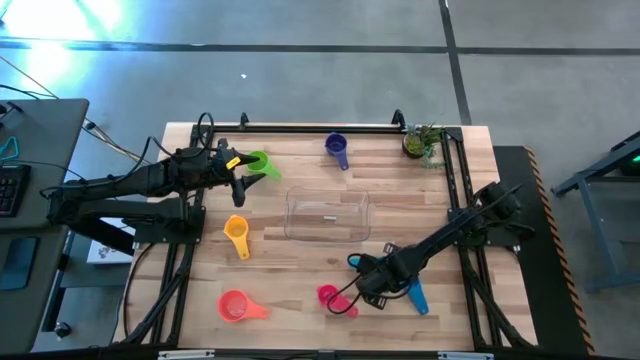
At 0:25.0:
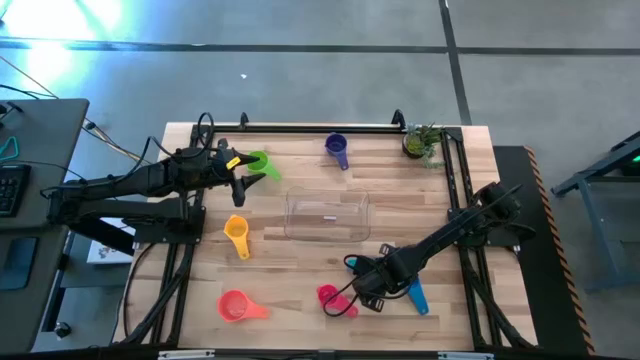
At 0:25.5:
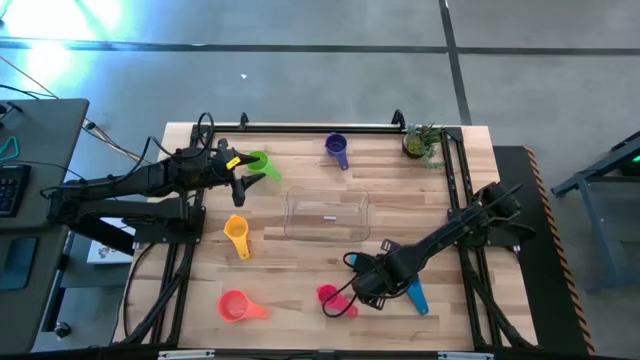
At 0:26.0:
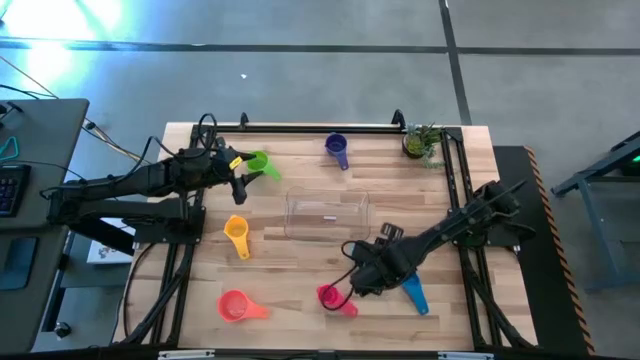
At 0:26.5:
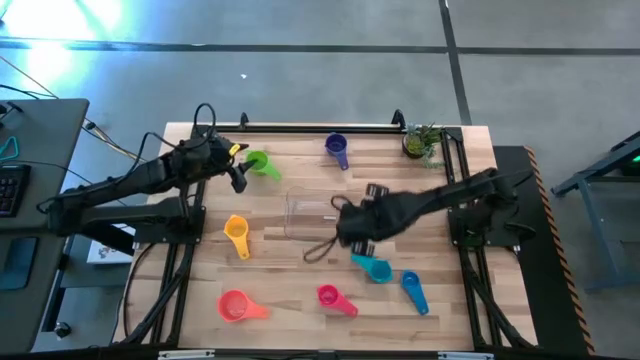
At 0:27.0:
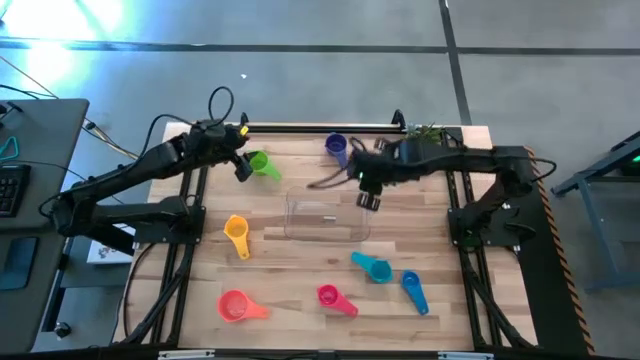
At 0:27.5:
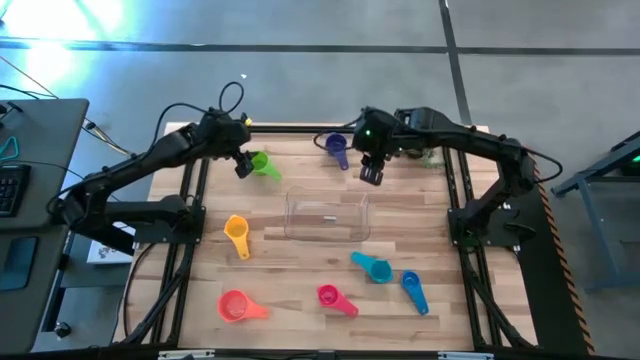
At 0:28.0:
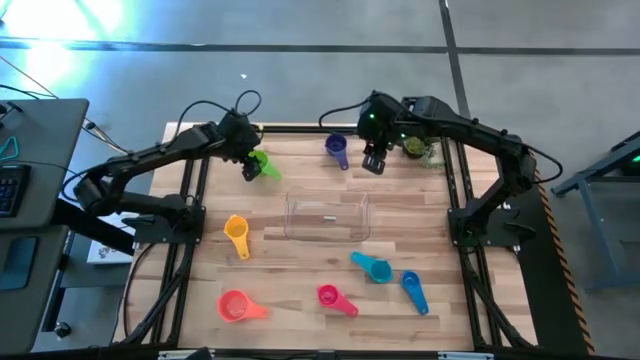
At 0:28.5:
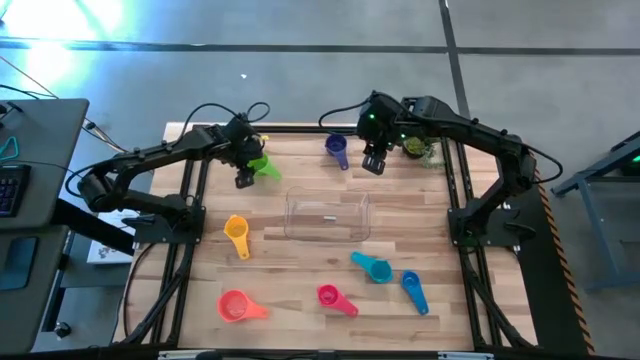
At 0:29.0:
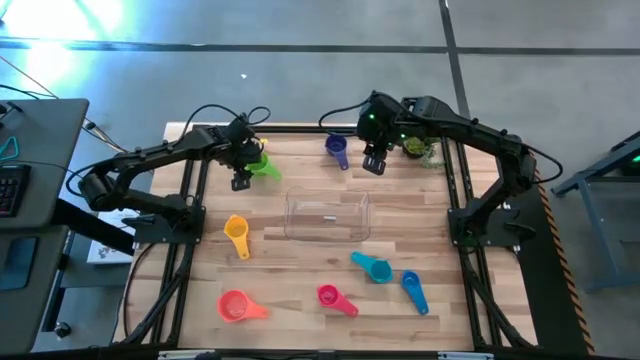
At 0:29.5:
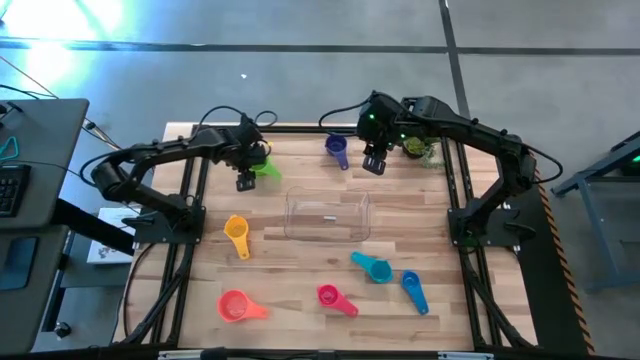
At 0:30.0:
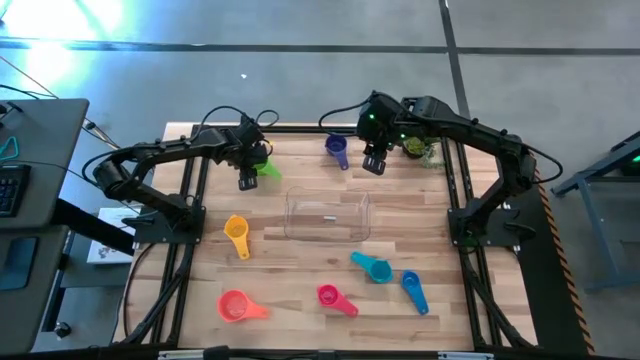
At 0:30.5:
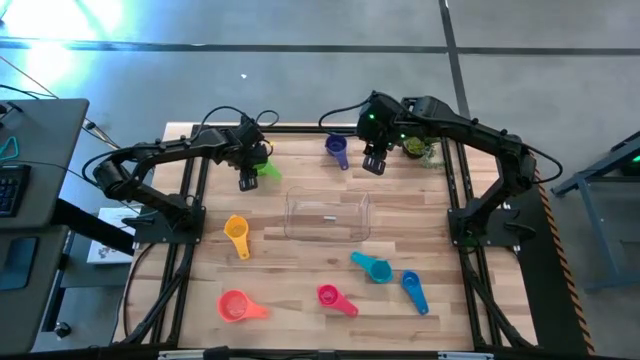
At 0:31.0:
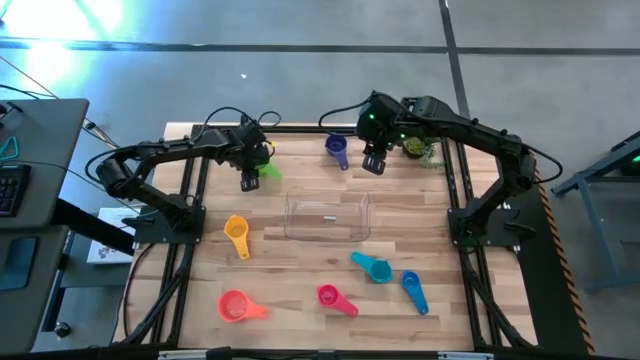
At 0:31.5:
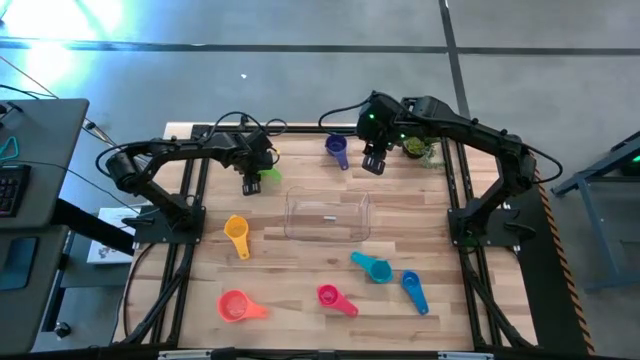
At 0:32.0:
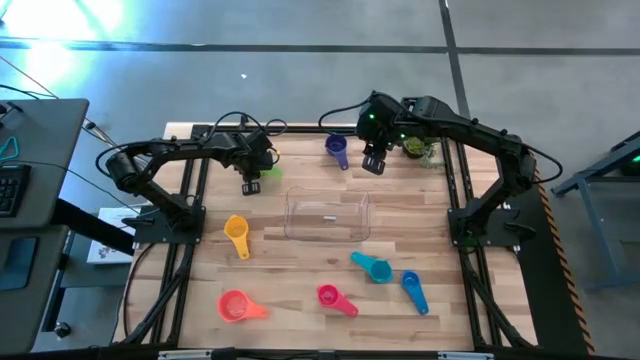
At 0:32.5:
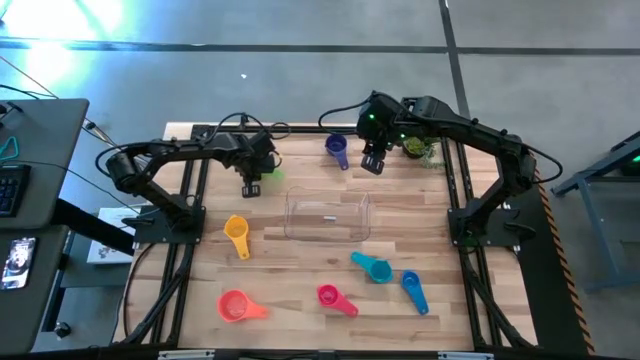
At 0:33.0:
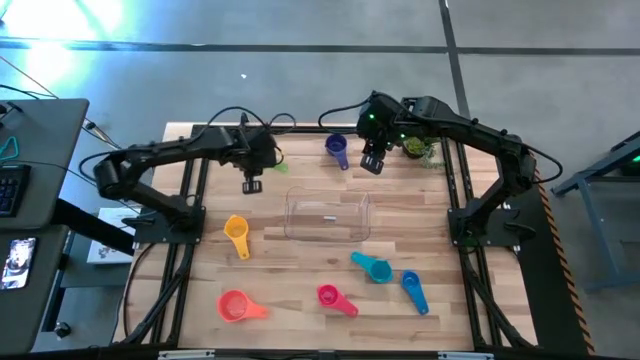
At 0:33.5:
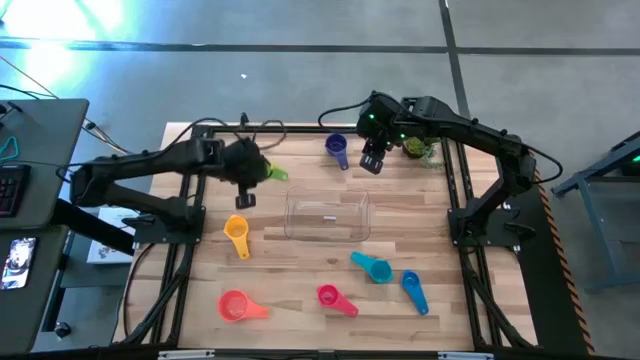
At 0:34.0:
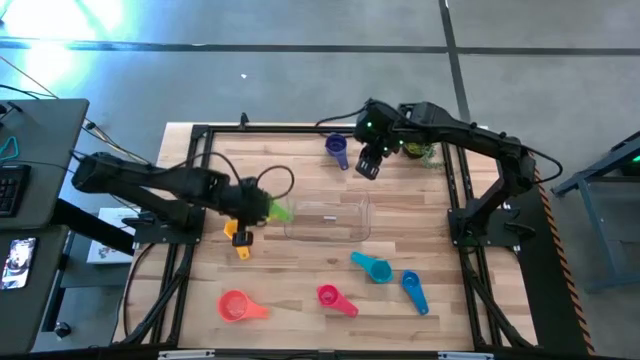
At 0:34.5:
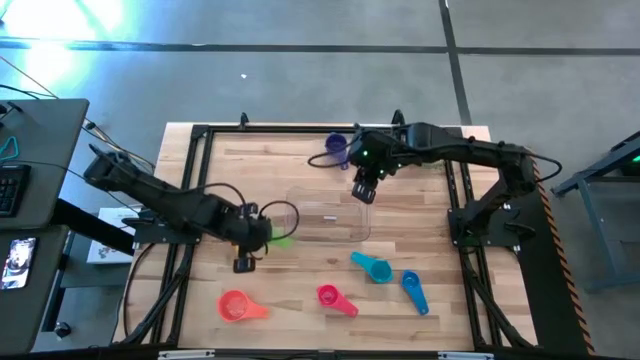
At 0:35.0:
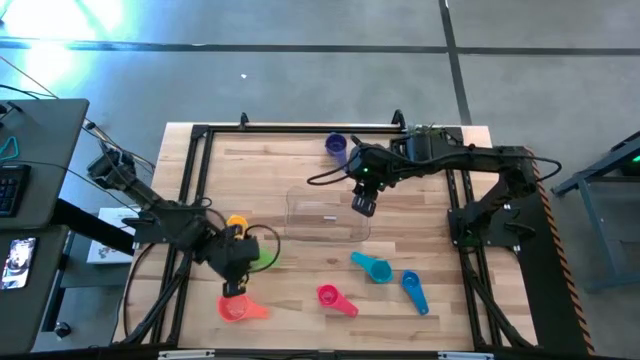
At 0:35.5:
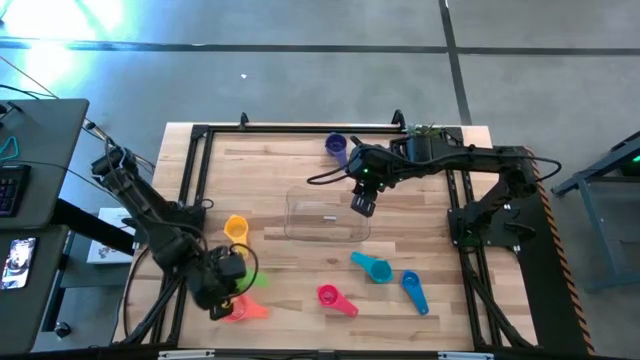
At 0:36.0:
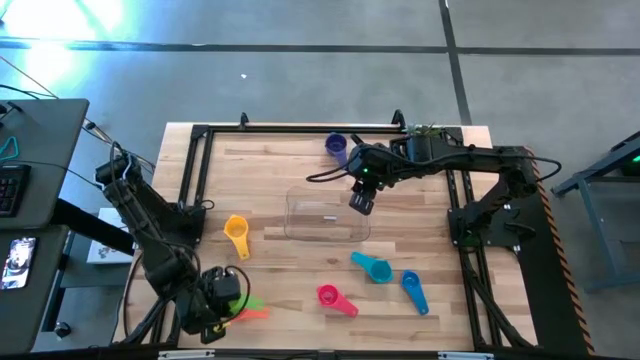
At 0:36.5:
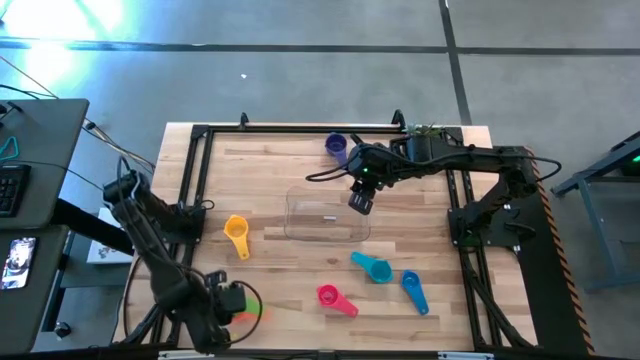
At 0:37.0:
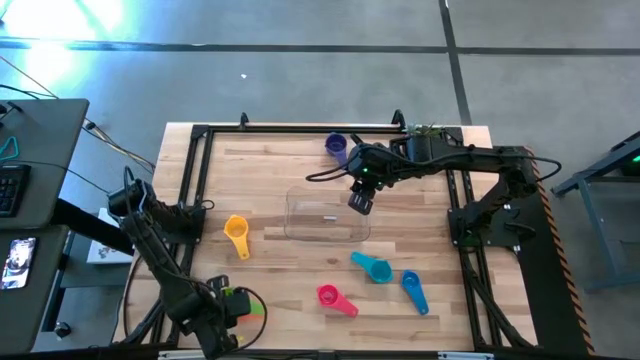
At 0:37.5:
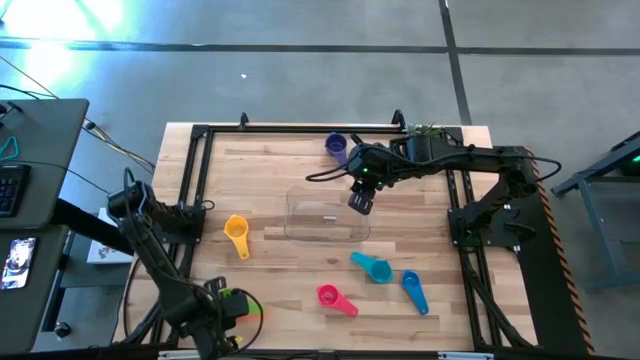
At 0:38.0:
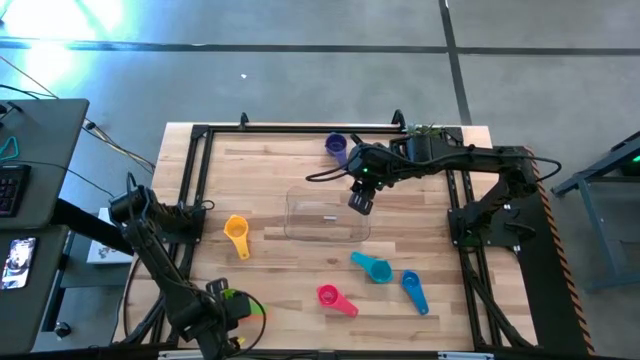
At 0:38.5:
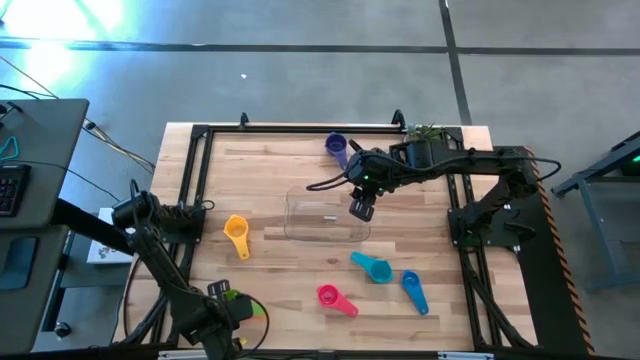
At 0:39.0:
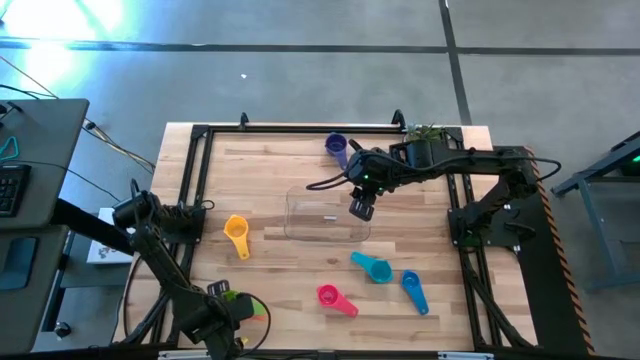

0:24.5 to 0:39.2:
Task: Nest measuring cups in basket
Stack the green measuring cup on top of the orange measuring cup

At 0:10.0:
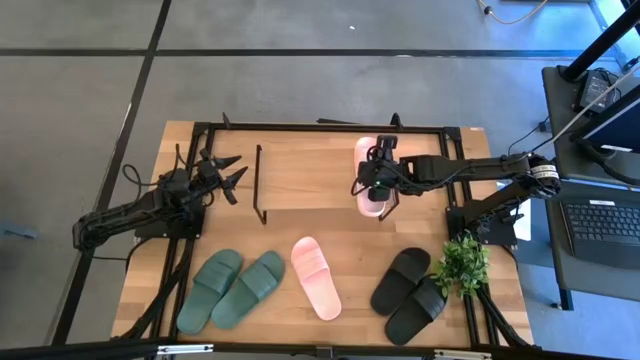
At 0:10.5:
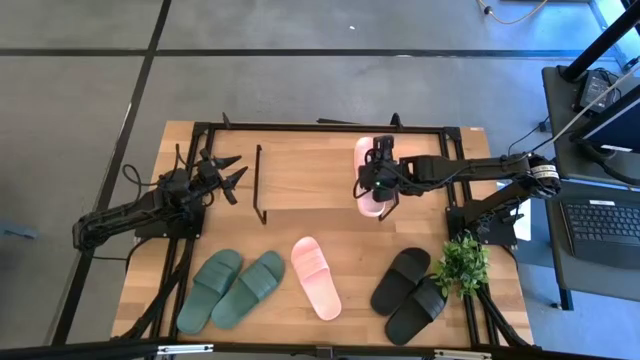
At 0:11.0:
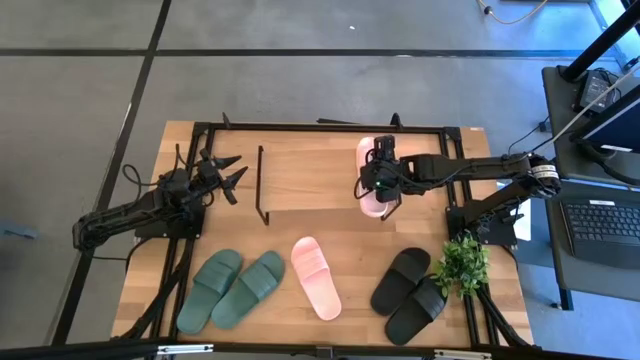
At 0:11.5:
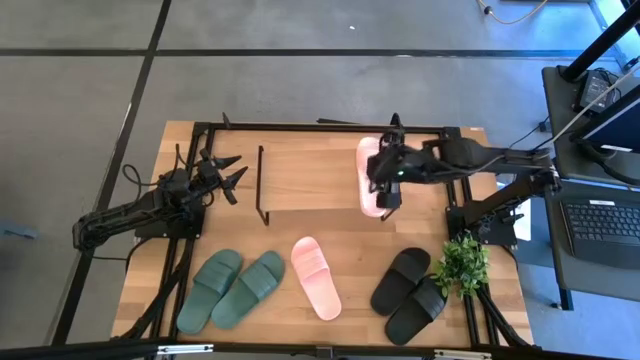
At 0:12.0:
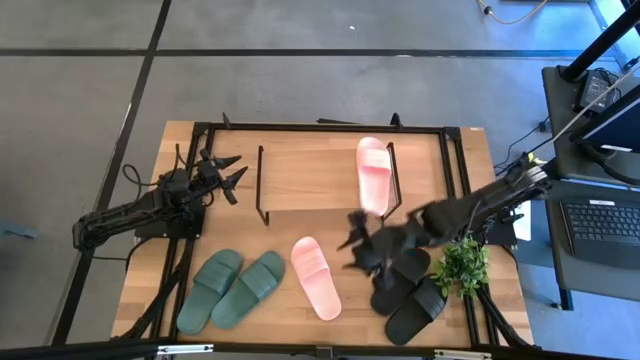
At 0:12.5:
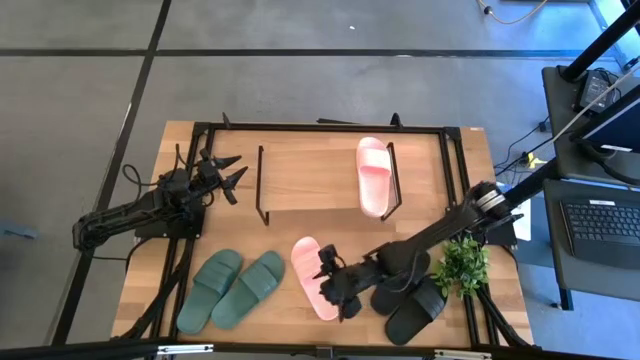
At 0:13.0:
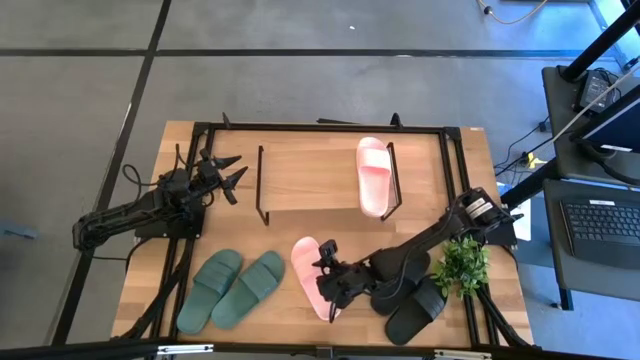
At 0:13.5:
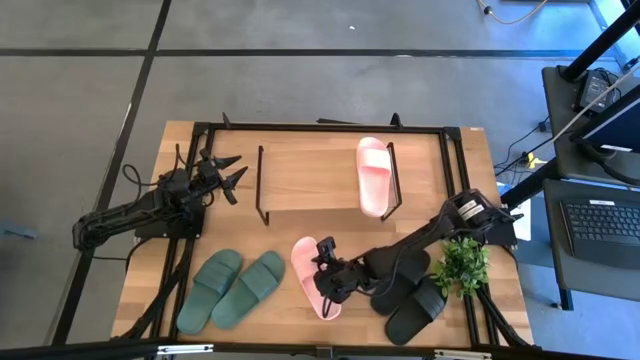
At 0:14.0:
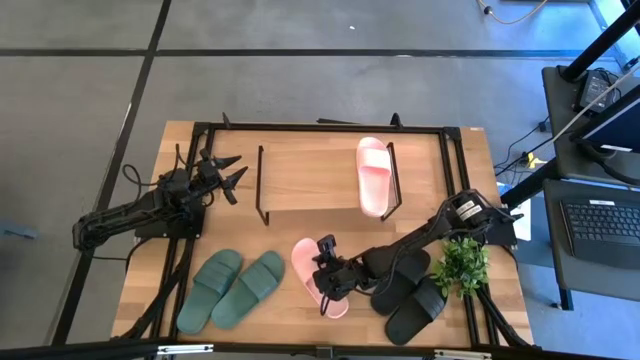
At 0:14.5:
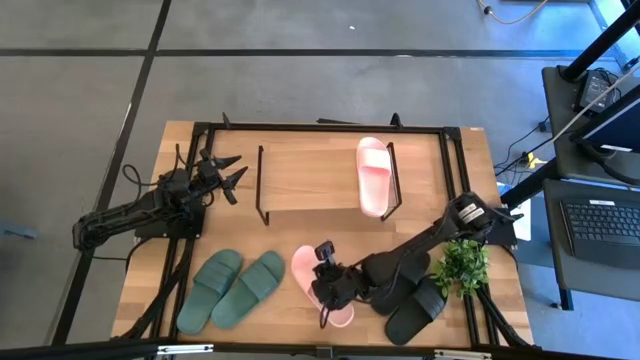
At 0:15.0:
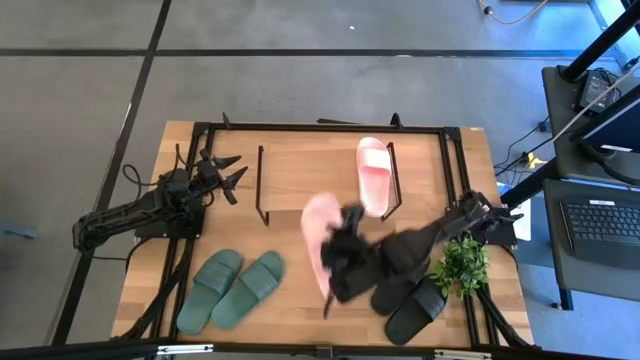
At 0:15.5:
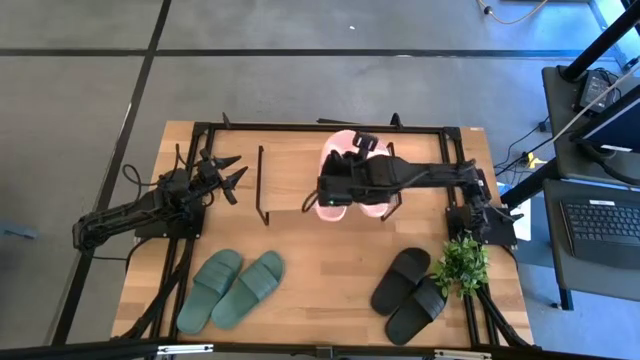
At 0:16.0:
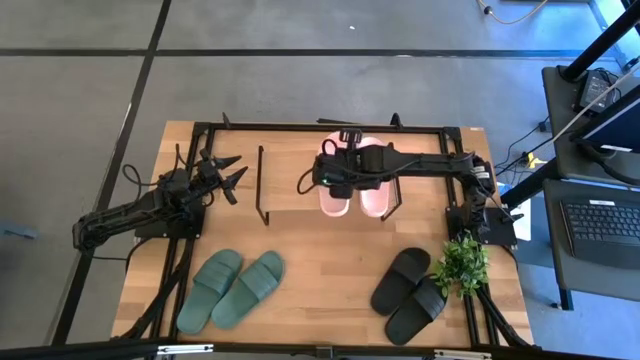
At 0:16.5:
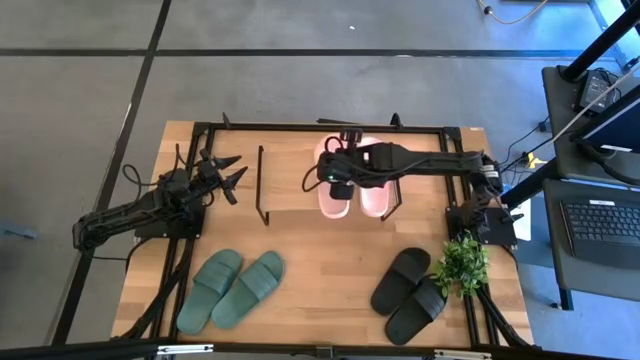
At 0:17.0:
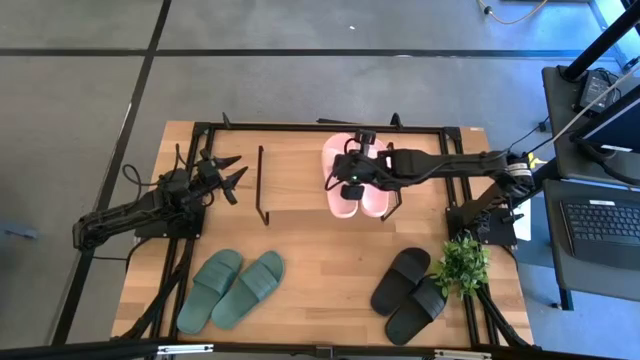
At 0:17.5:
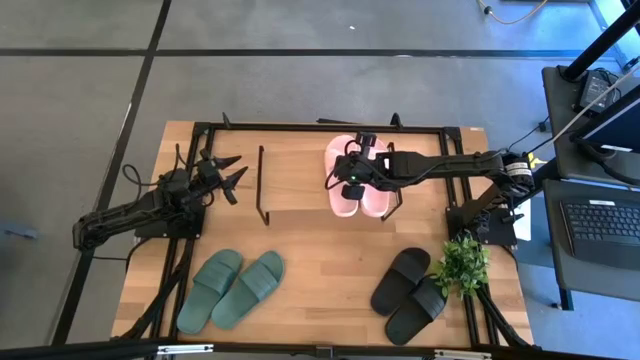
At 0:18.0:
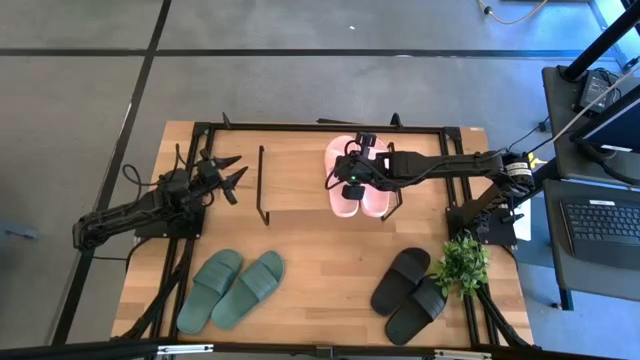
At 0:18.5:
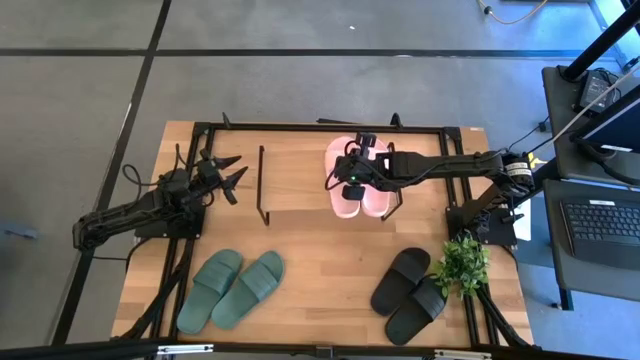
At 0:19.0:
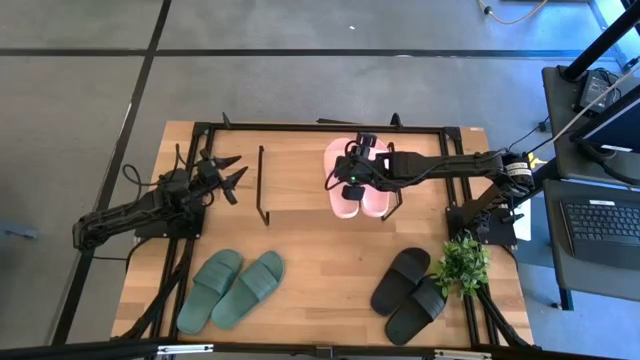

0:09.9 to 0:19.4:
Task: Pick and place slides into the shelf
Put the pink slide on the shelf
